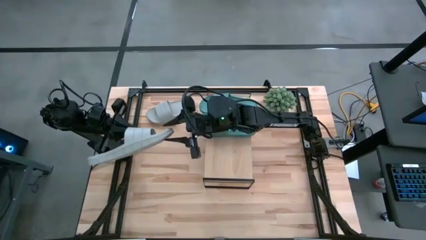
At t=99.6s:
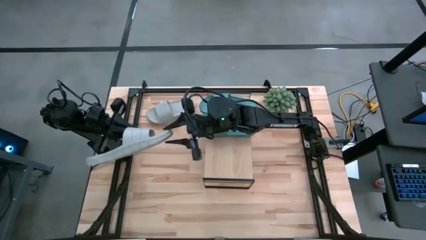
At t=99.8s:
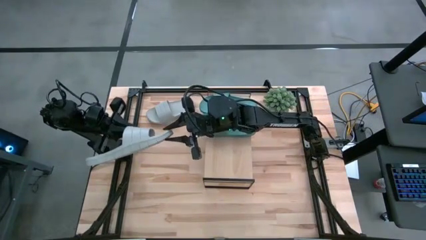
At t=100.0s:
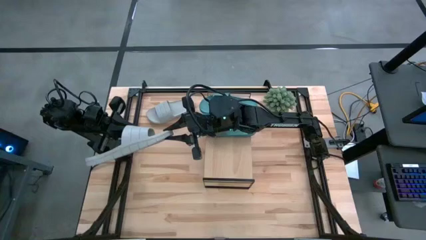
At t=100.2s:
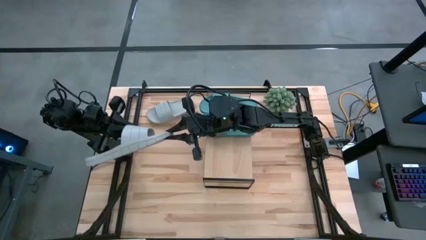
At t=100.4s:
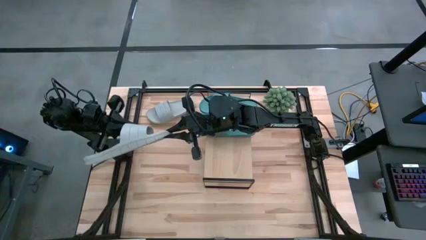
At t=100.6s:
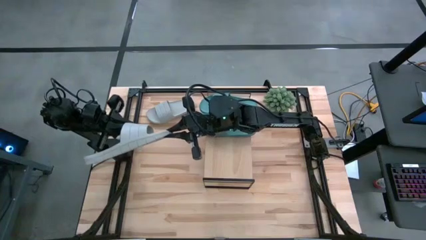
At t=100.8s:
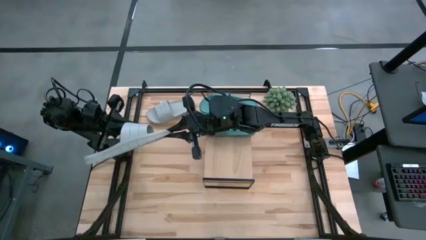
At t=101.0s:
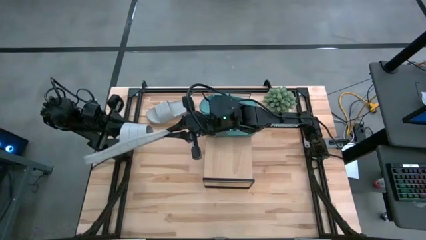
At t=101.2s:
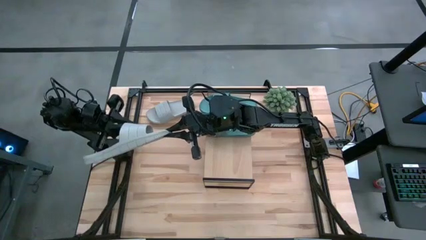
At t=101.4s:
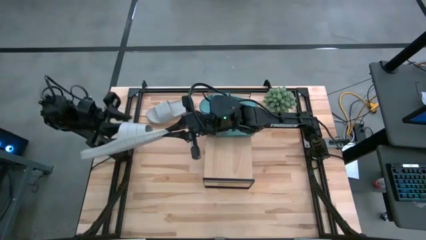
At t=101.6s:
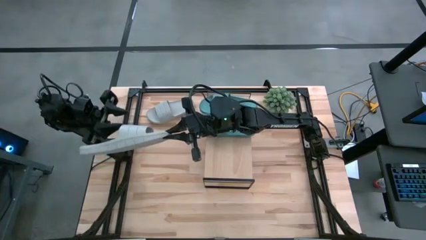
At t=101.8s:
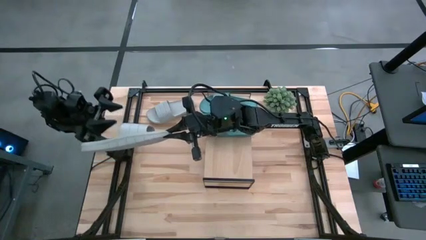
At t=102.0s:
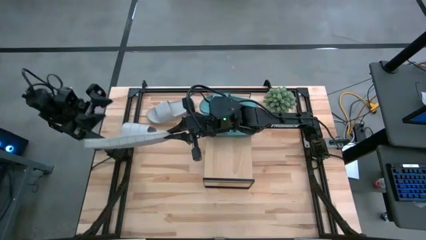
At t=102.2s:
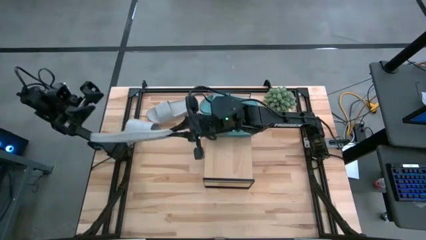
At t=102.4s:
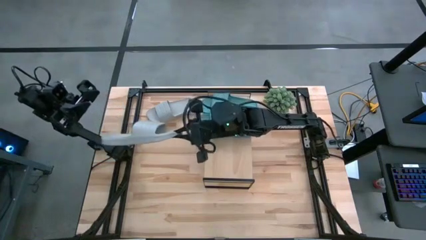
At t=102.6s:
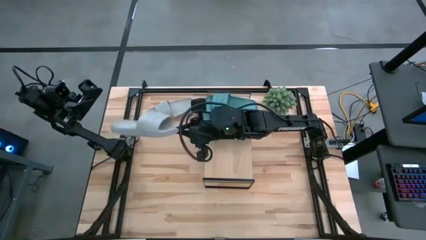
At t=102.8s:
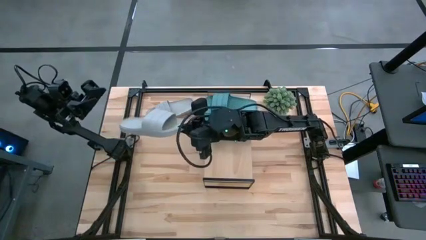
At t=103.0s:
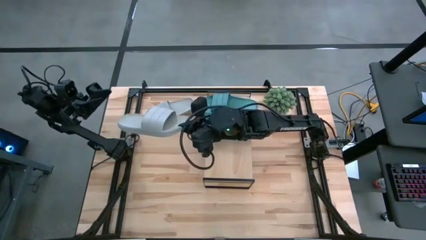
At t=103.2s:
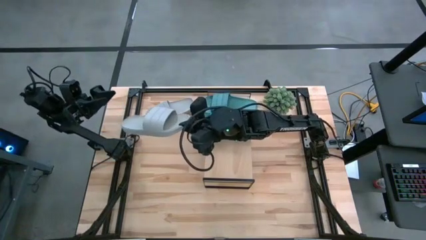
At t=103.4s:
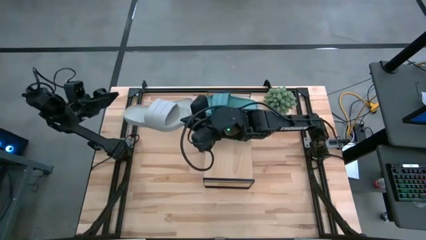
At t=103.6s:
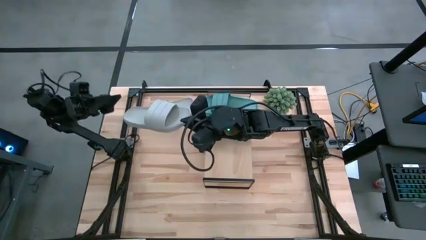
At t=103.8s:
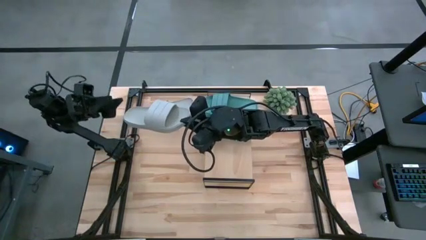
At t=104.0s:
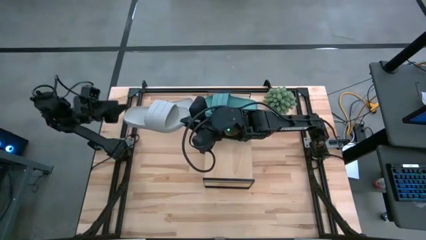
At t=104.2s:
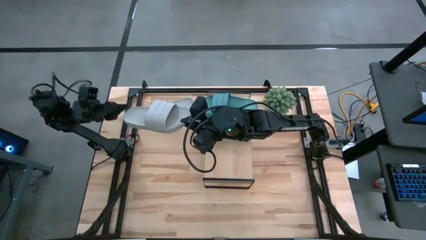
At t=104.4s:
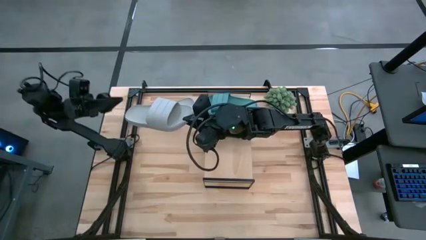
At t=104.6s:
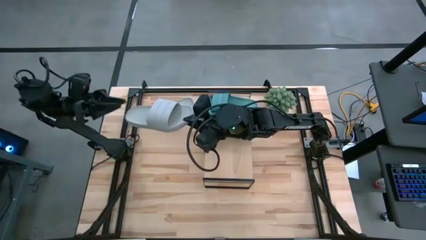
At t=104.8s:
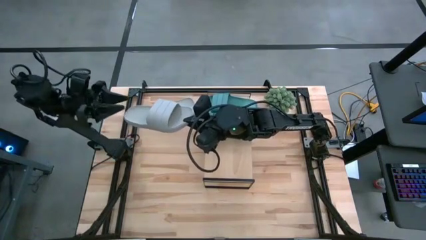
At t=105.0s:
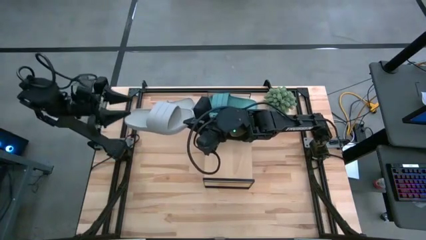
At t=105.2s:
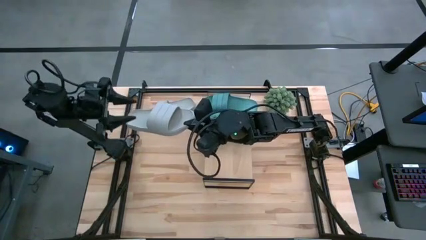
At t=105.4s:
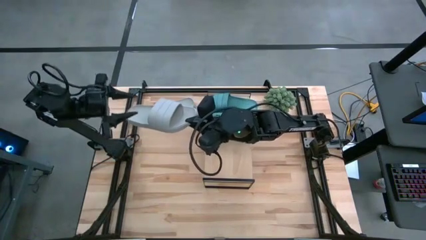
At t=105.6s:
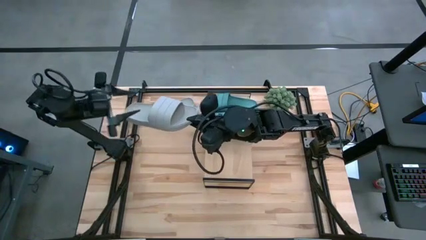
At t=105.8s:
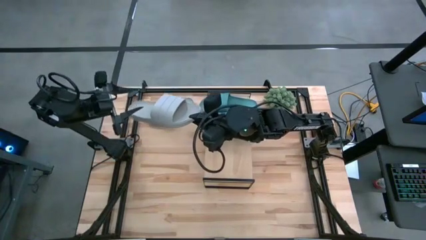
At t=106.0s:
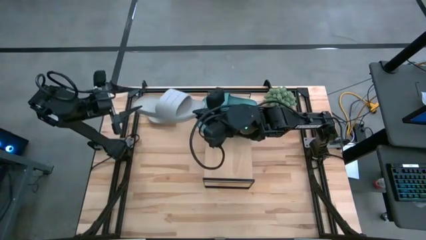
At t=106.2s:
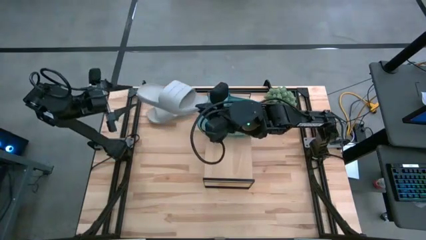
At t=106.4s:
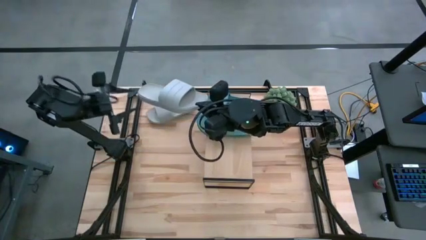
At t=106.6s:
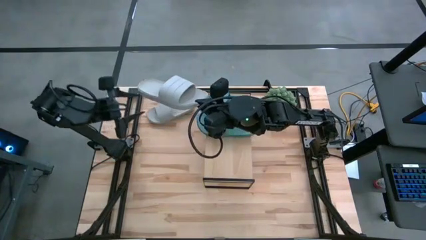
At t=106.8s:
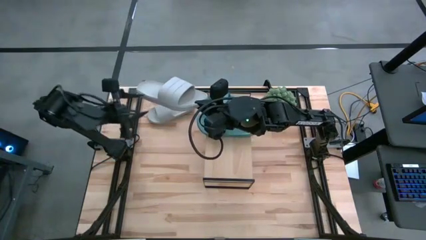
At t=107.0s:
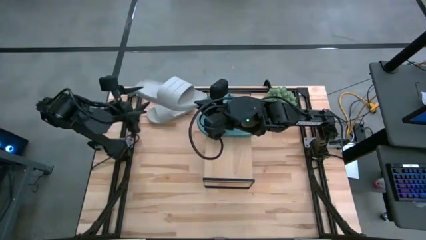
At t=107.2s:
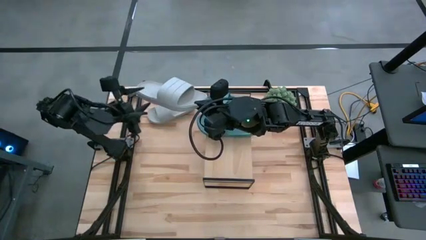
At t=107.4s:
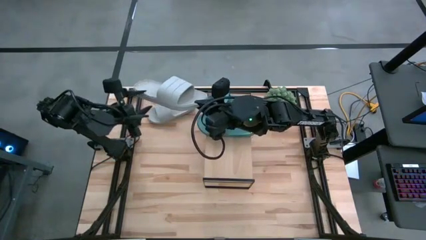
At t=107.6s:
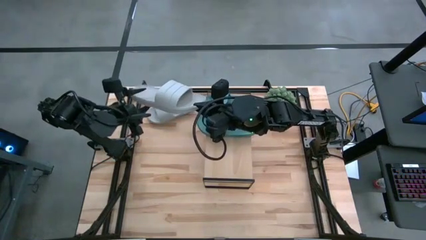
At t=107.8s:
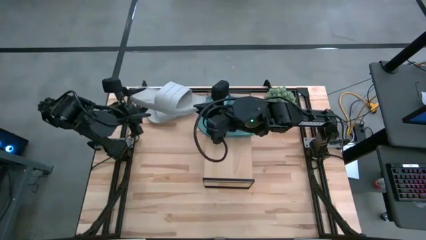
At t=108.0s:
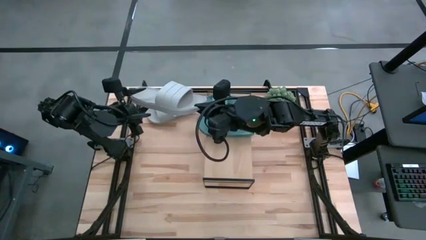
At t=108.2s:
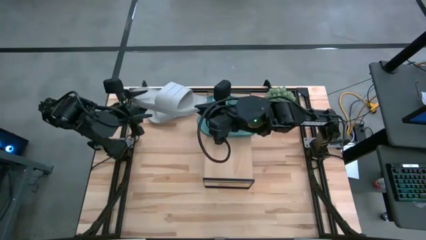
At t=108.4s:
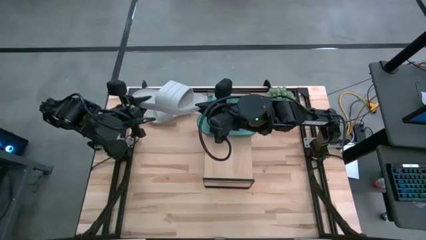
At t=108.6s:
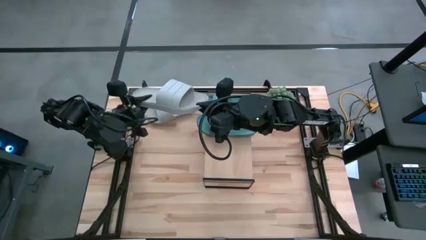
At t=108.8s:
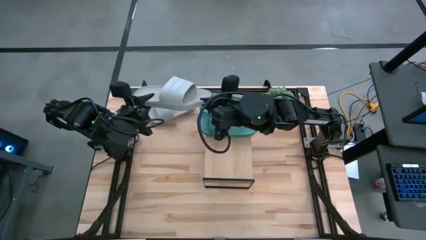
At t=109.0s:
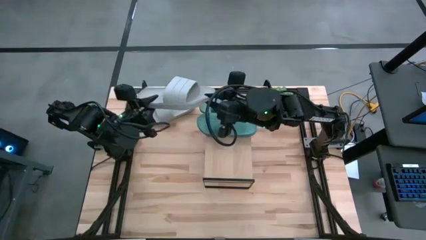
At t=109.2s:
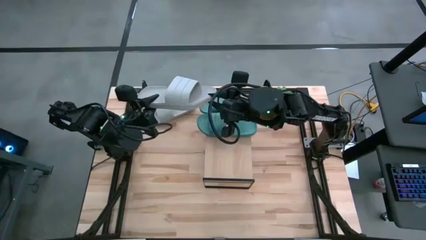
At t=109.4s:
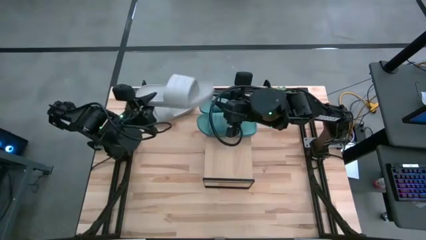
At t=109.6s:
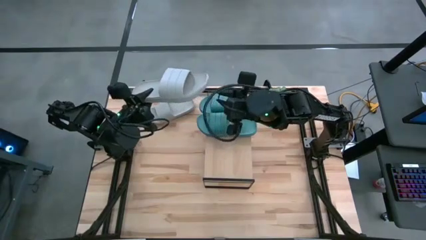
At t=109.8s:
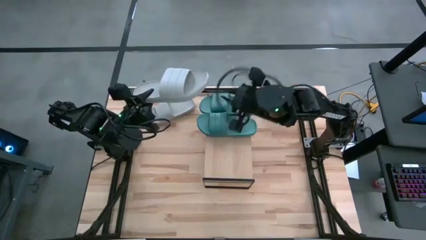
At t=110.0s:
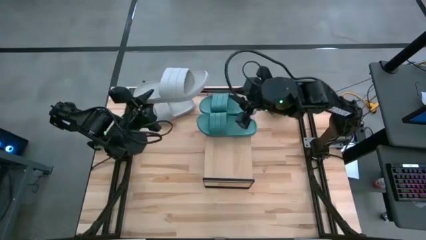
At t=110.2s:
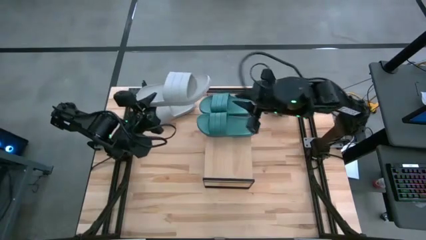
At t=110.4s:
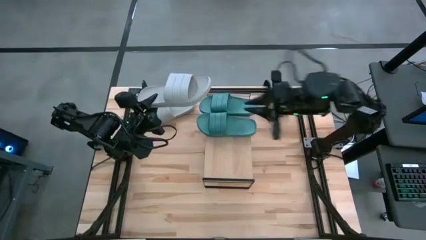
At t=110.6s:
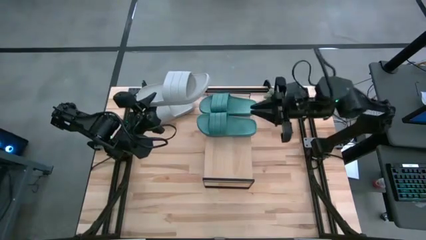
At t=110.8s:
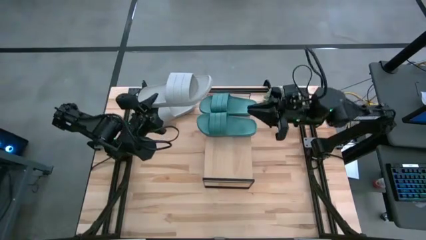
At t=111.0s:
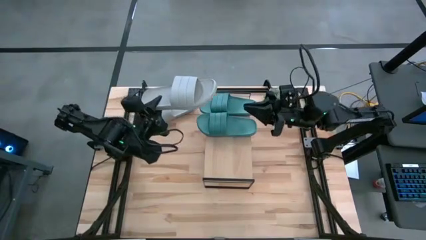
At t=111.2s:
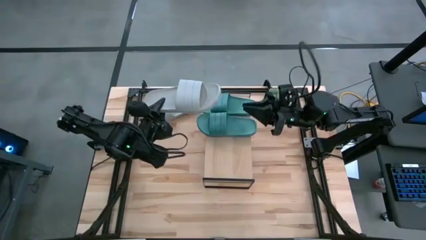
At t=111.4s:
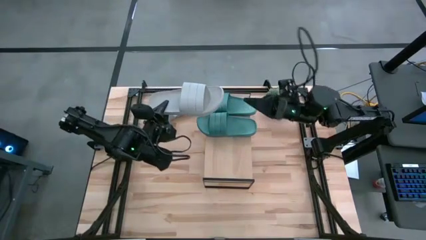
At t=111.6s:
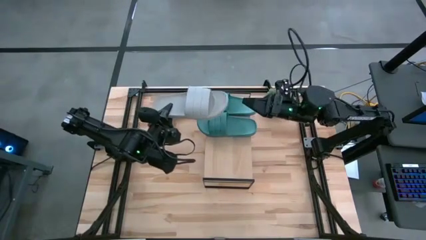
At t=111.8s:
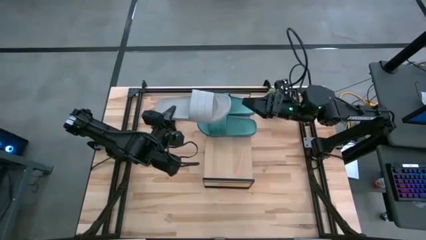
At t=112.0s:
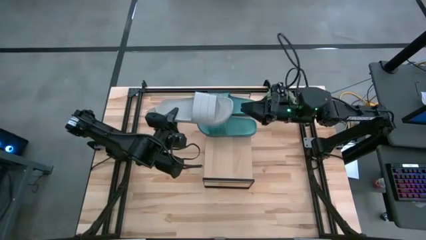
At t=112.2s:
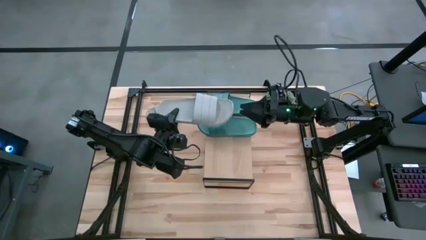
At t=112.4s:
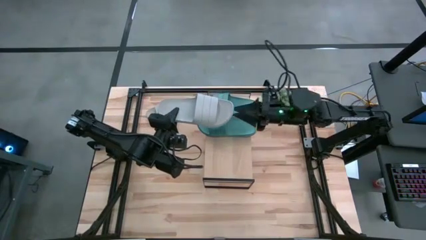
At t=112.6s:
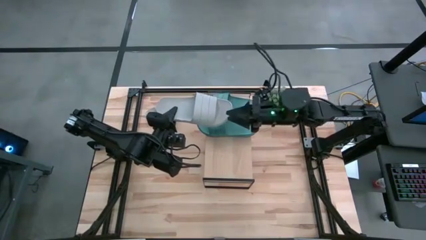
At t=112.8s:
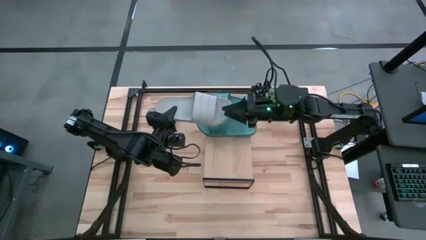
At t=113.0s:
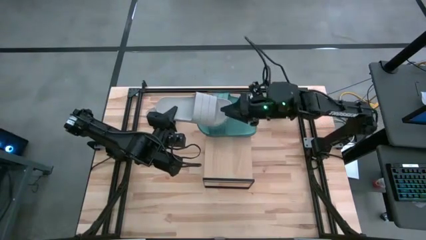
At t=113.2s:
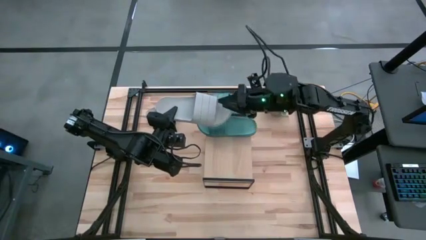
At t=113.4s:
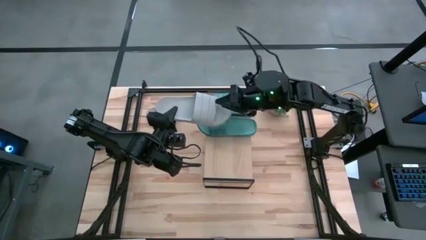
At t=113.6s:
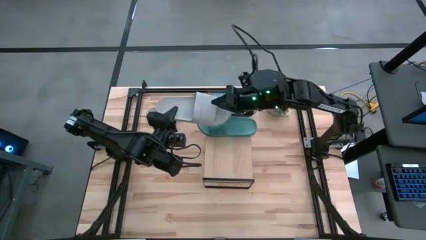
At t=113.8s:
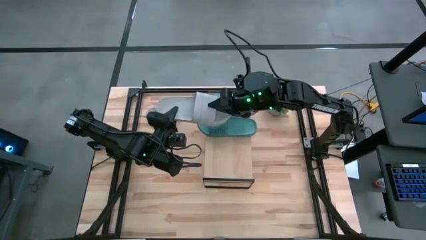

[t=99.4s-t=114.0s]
Task: Pick and place slides into the shelf
Put the bottom gray slide on the shelf
